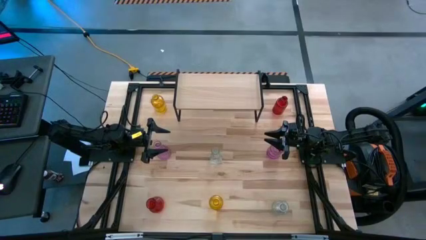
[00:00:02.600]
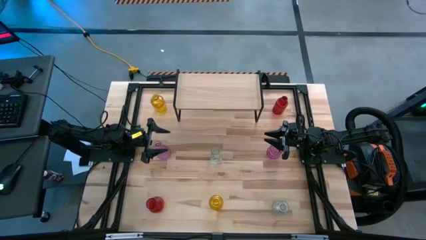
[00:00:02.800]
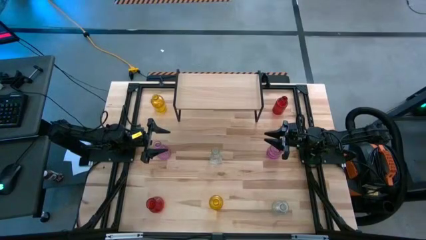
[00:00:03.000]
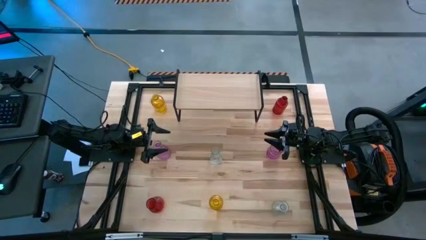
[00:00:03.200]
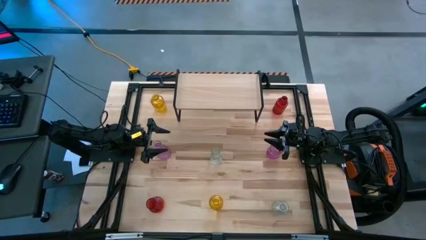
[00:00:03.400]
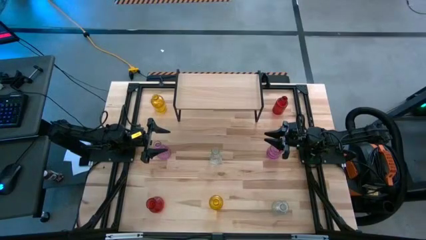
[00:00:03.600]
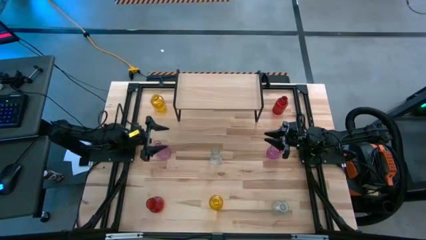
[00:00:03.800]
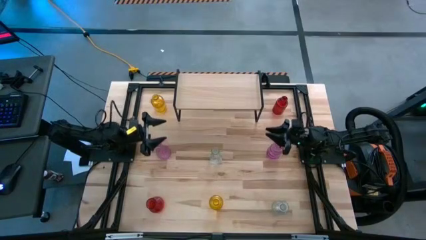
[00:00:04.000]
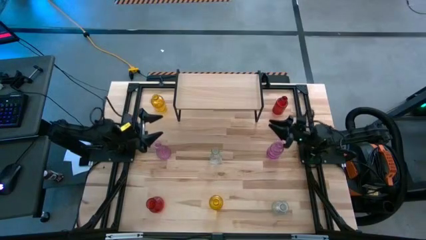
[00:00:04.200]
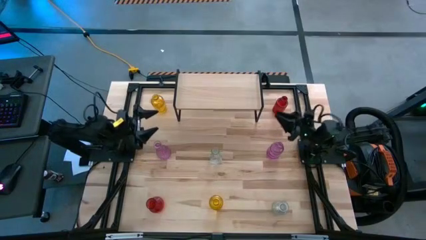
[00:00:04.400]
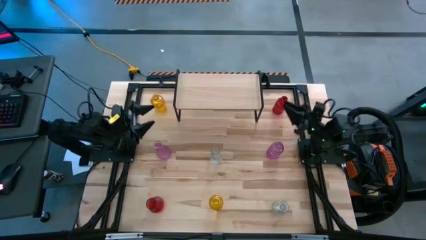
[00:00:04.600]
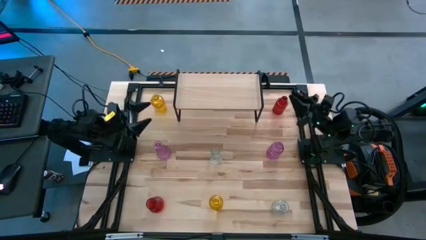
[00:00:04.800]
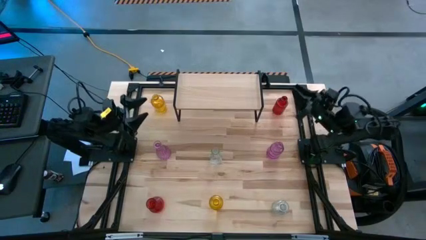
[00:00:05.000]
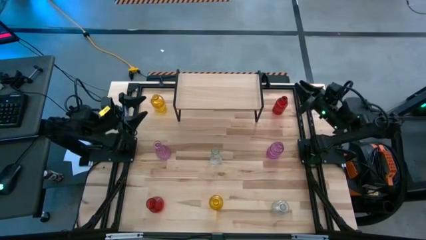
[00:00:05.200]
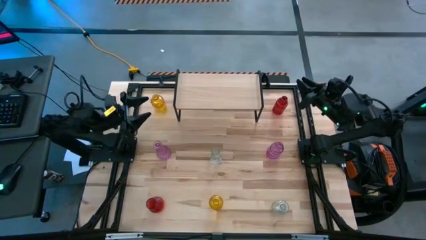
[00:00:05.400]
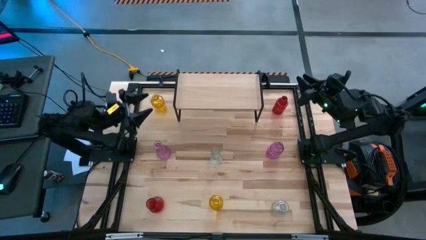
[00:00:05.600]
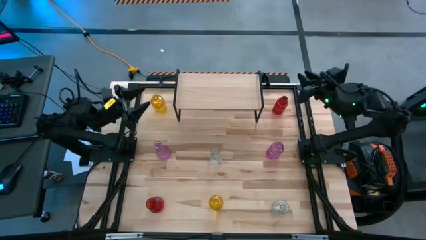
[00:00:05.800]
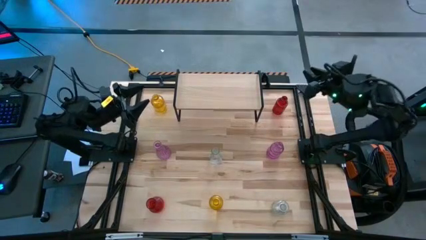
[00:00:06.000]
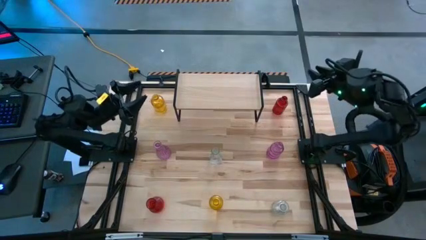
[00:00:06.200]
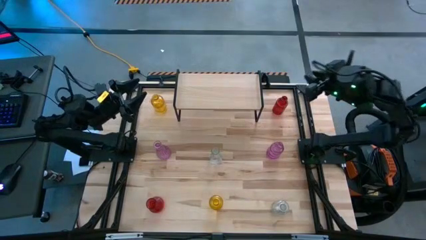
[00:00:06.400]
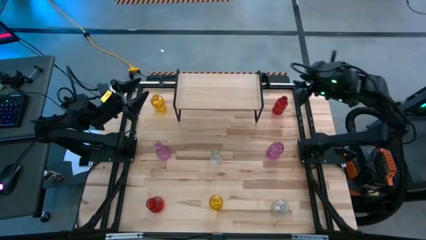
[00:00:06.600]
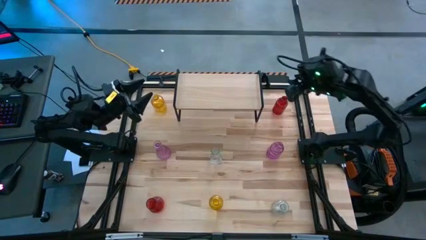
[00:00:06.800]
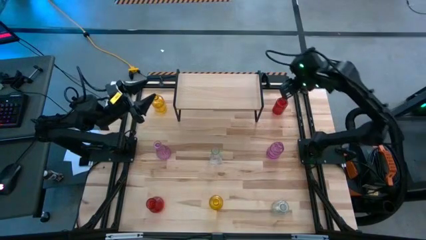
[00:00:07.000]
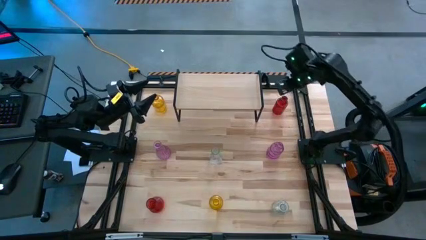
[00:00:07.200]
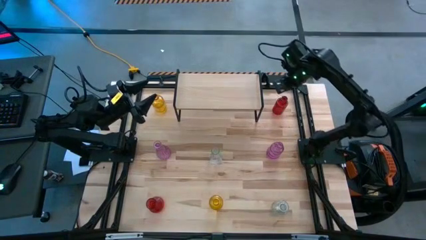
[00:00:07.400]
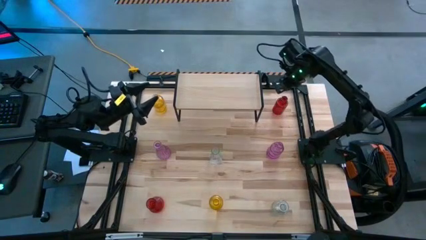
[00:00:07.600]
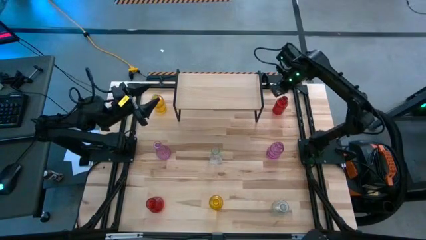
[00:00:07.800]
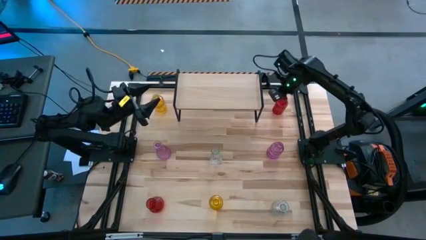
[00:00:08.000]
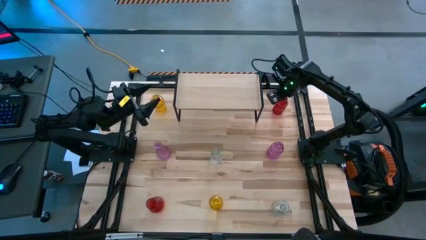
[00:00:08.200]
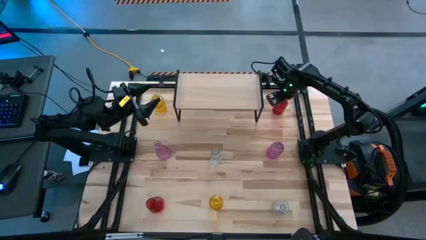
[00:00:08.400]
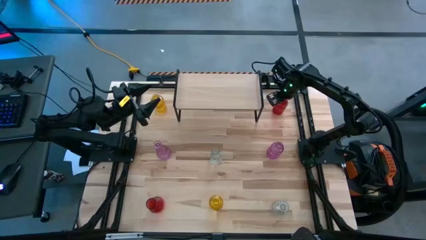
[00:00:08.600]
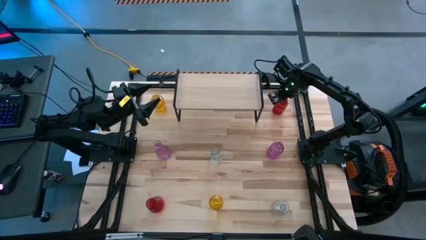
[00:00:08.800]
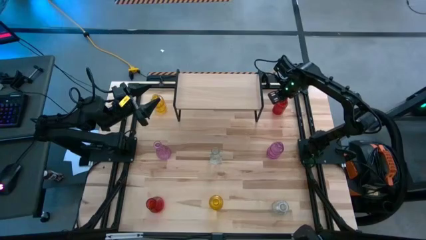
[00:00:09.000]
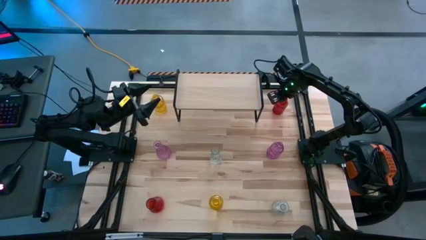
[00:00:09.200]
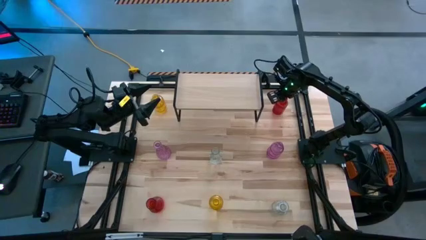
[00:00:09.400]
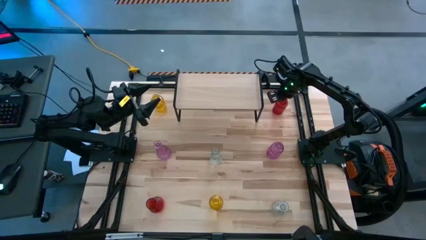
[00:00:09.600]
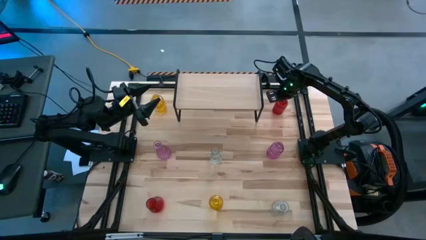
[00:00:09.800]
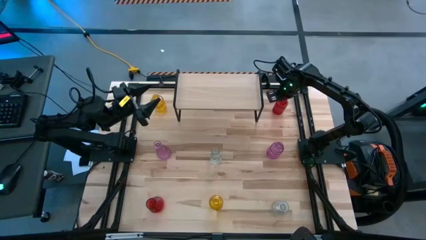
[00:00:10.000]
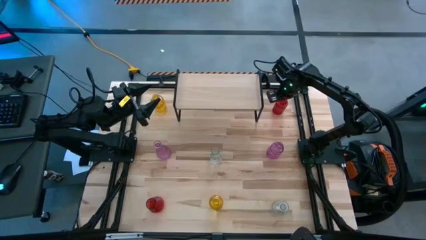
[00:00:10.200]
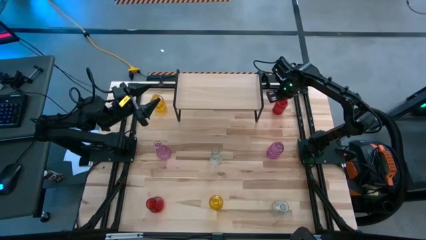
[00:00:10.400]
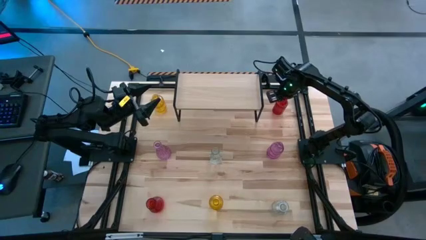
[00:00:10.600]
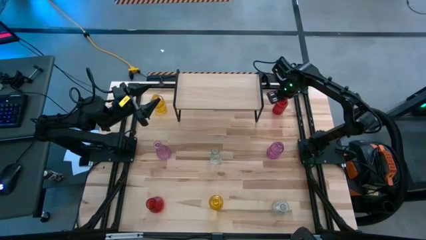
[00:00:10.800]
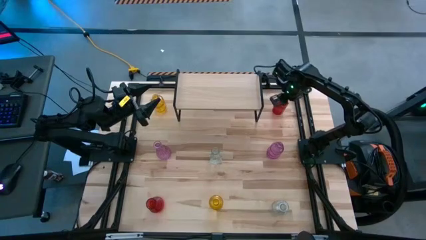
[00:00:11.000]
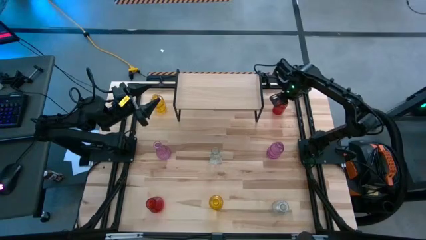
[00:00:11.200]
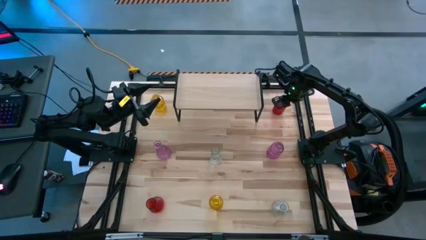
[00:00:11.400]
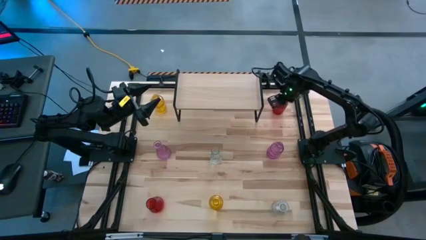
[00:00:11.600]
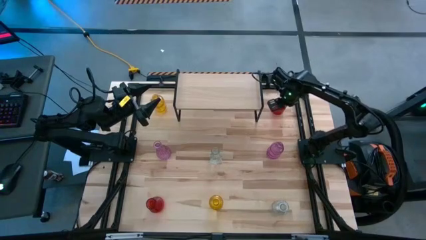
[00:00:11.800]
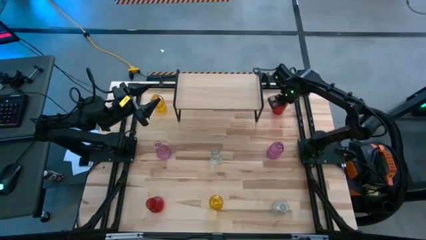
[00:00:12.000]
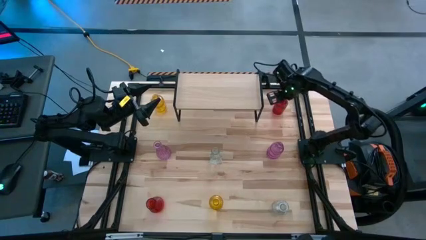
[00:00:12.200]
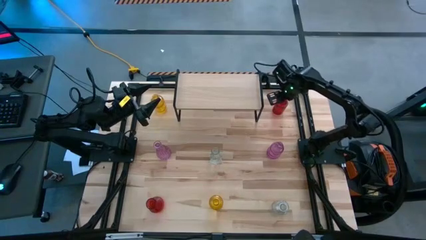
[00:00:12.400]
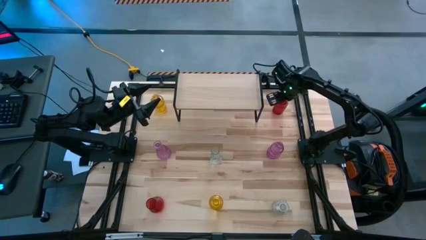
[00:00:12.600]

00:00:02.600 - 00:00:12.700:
Task: sort vases onto shelf
Put the top red vase on the shelf
